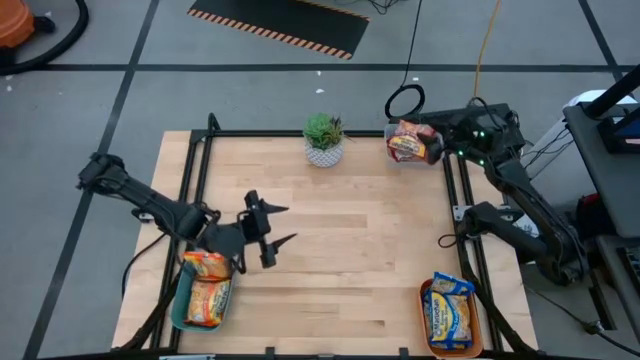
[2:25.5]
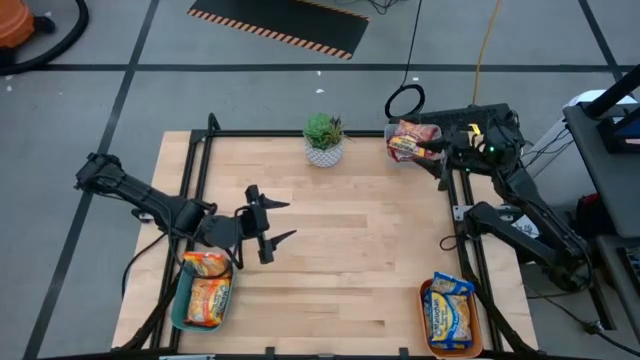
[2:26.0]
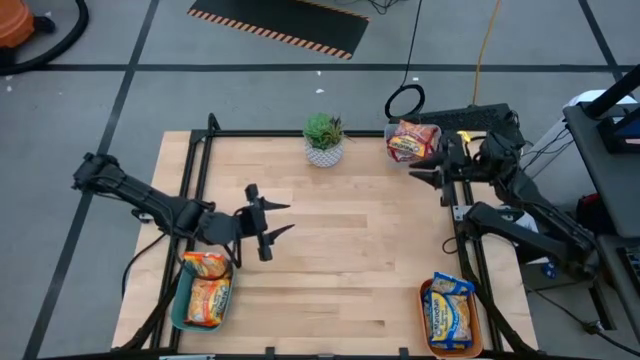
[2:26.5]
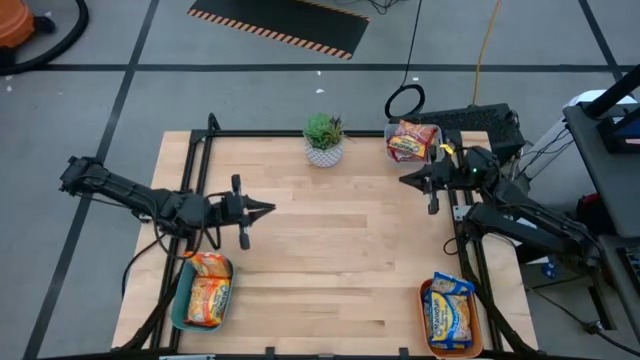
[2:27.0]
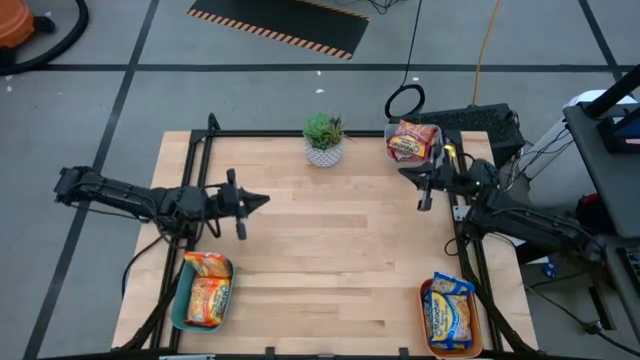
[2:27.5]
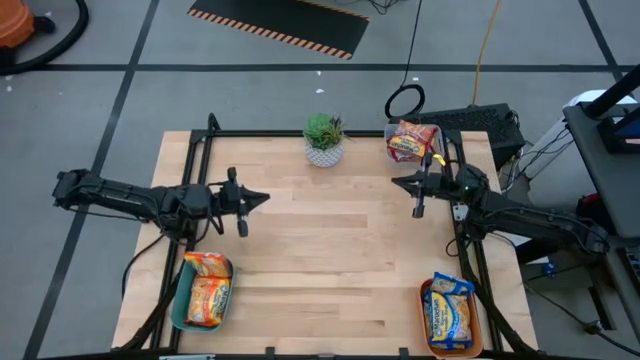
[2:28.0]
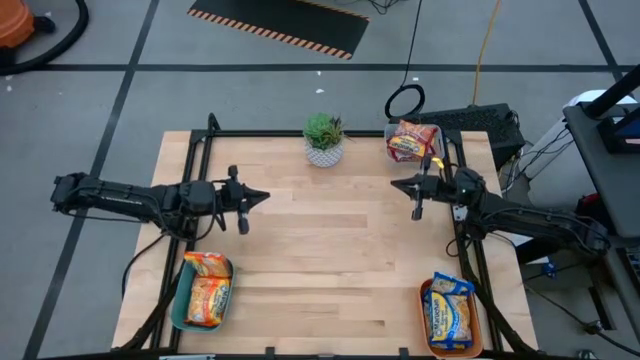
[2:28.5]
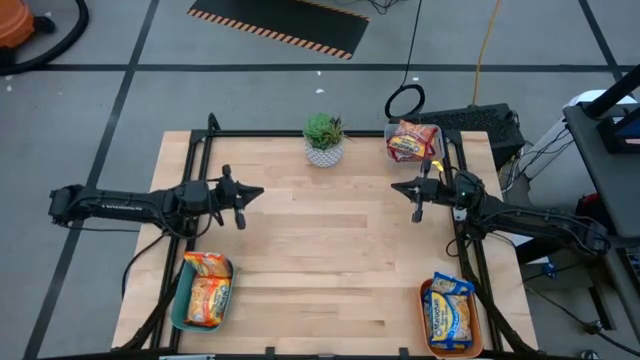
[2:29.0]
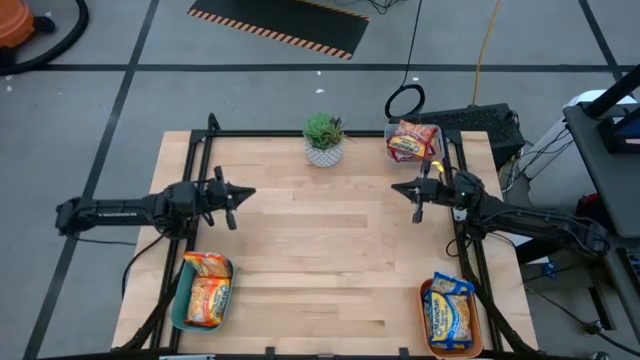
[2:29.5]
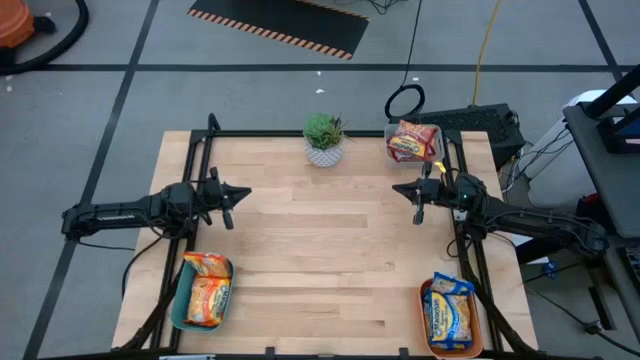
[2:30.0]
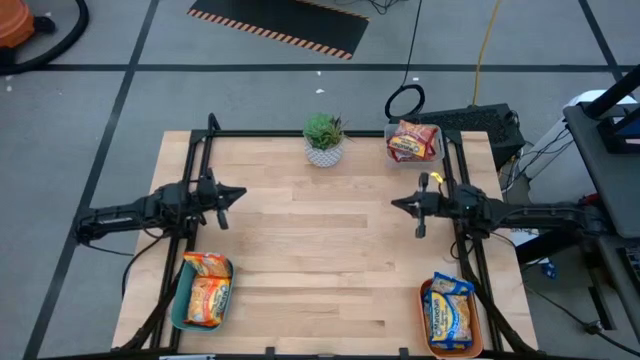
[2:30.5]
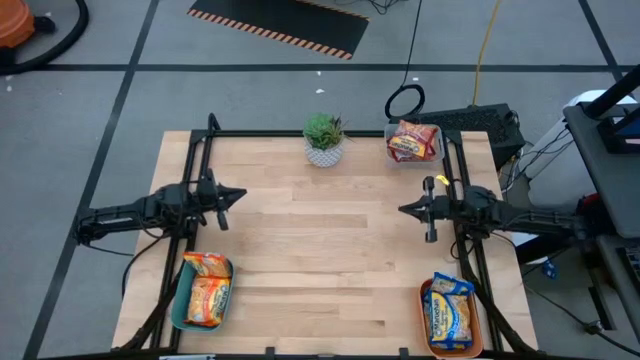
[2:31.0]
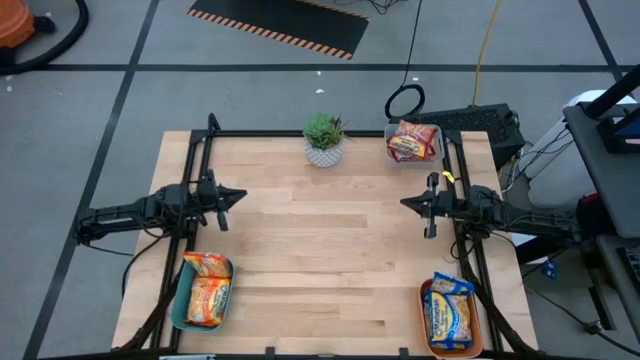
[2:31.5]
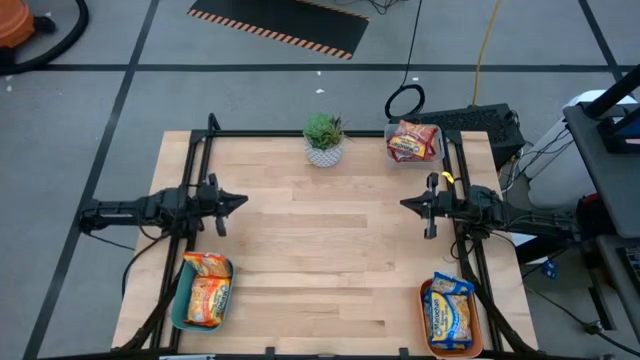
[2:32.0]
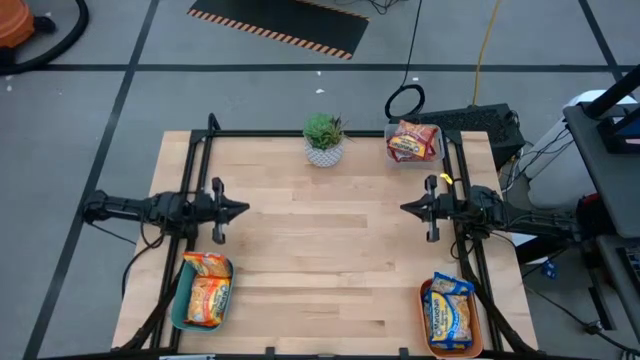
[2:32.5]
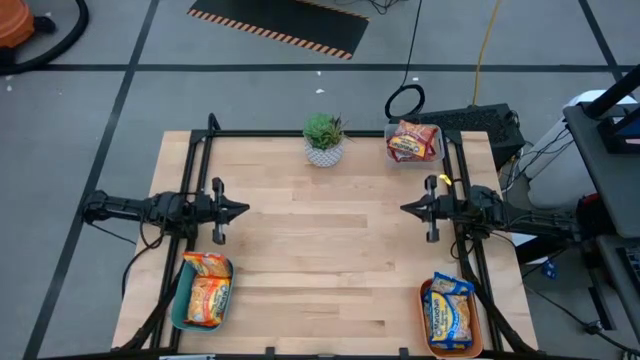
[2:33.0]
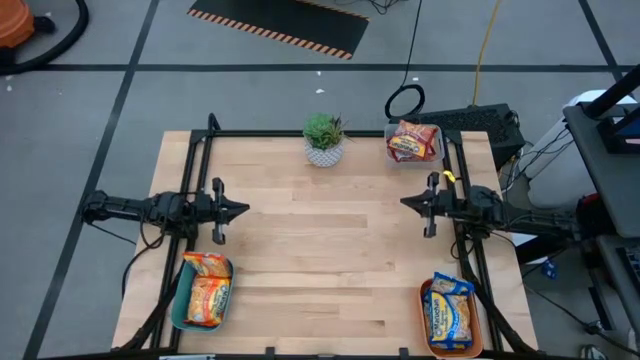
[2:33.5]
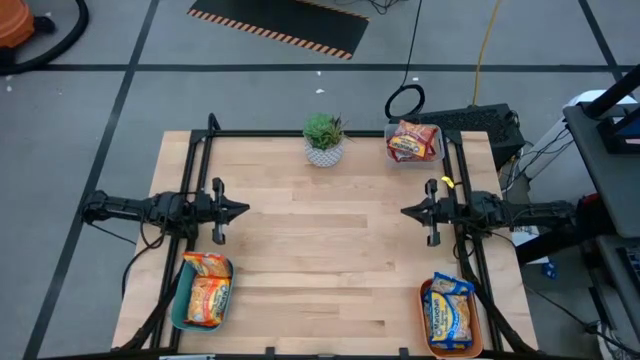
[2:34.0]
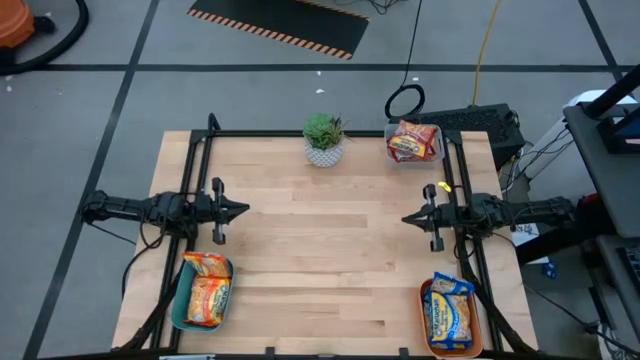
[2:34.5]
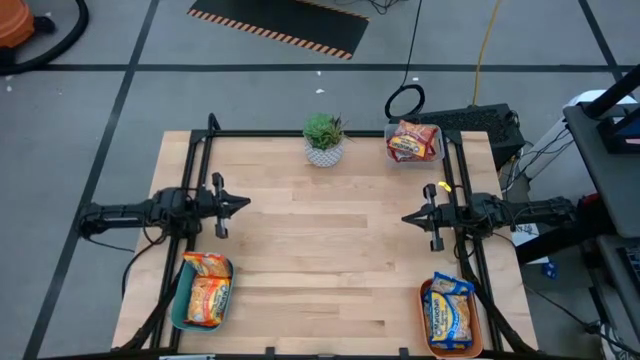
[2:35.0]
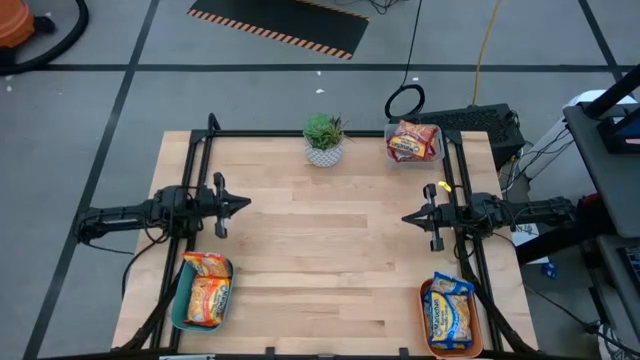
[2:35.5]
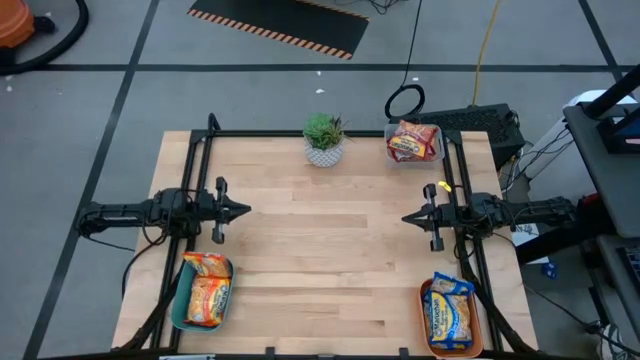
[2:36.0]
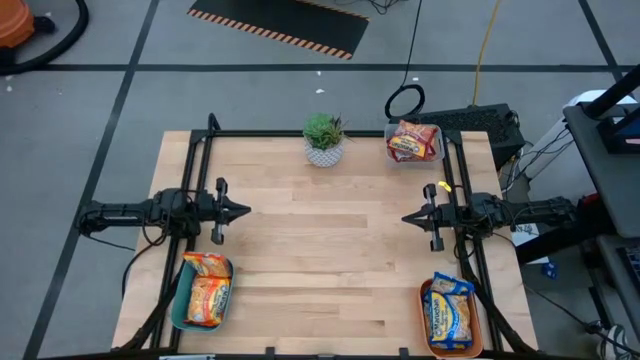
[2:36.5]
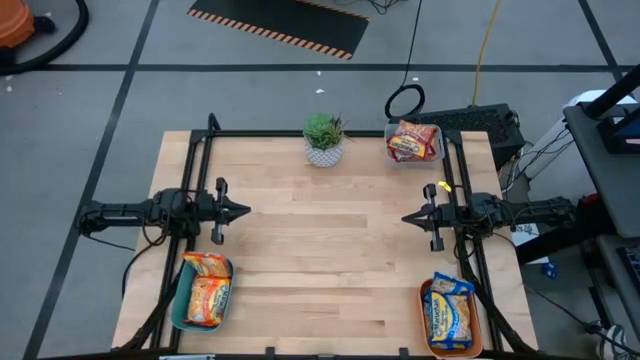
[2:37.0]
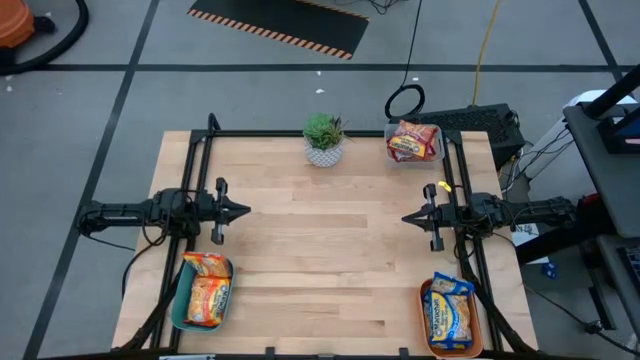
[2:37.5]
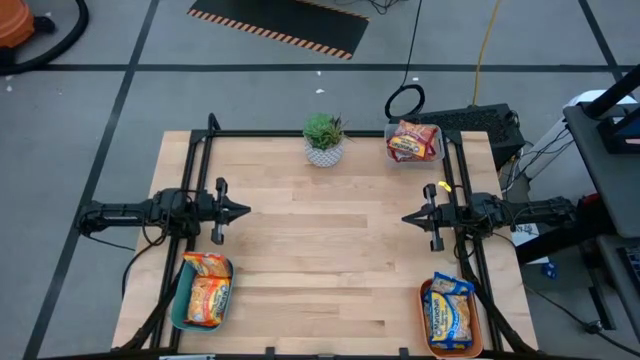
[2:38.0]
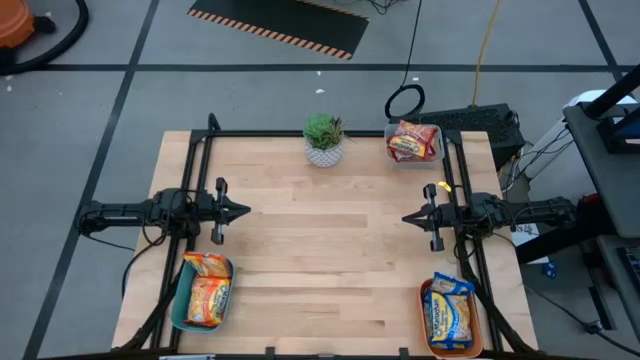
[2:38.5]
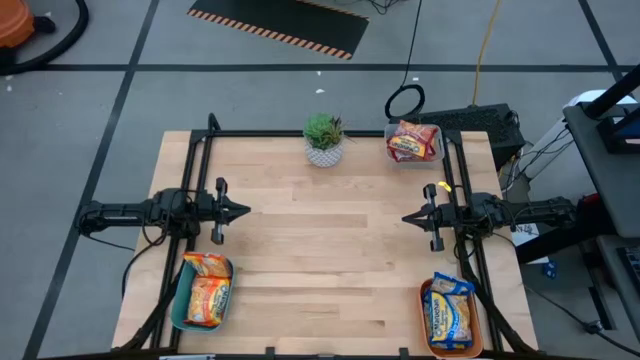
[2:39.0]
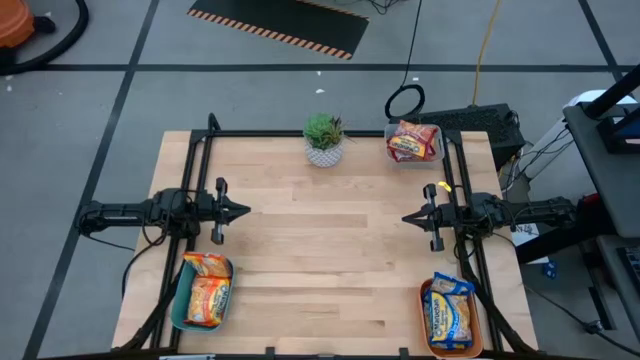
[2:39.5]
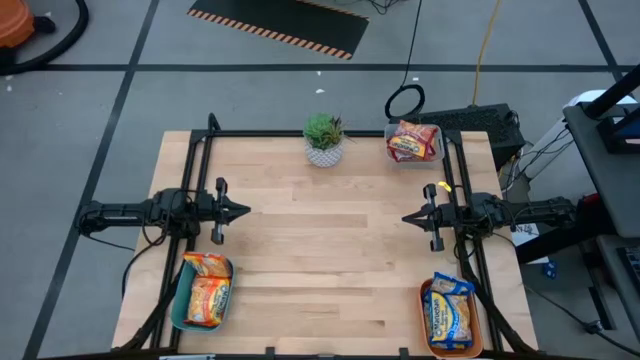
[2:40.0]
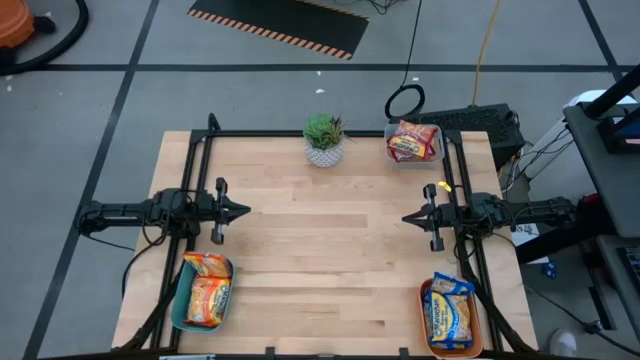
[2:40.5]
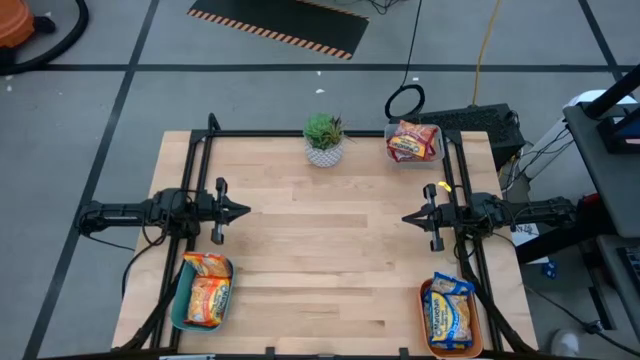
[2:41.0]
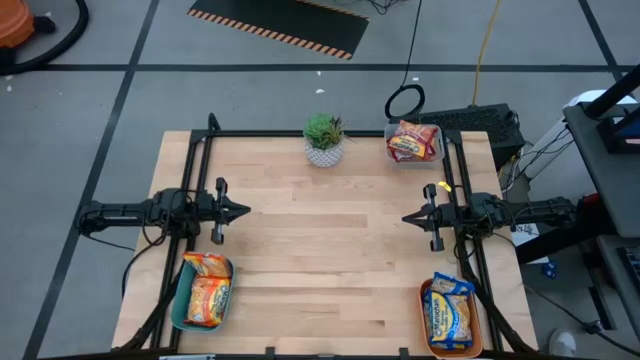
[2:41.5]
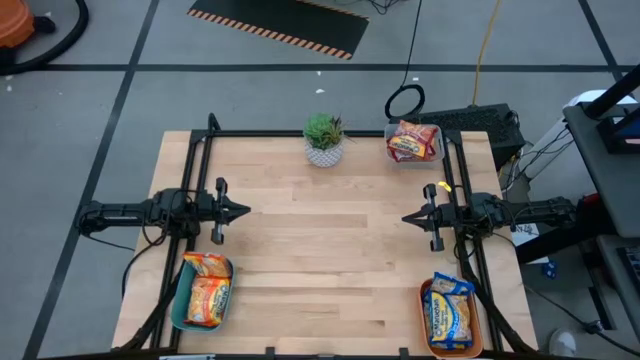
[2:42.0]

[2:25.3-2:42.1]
Task: Sort Maruchan noodles
Return to Home Position

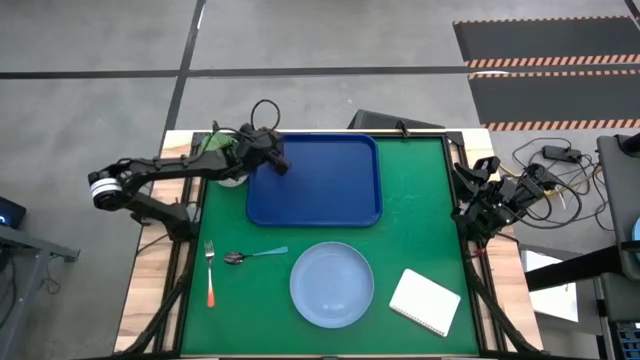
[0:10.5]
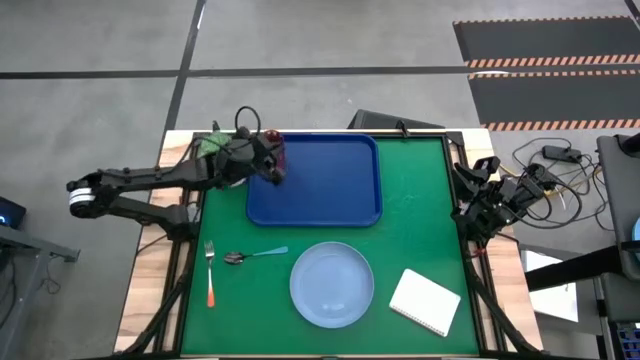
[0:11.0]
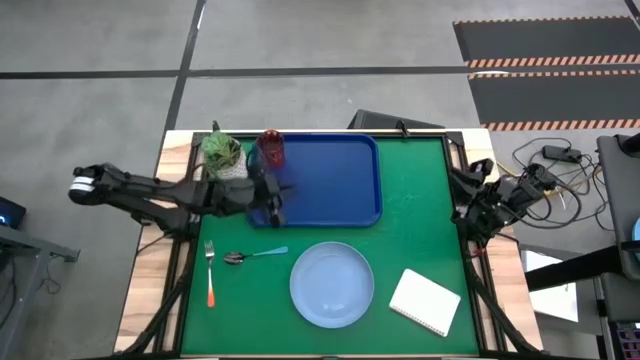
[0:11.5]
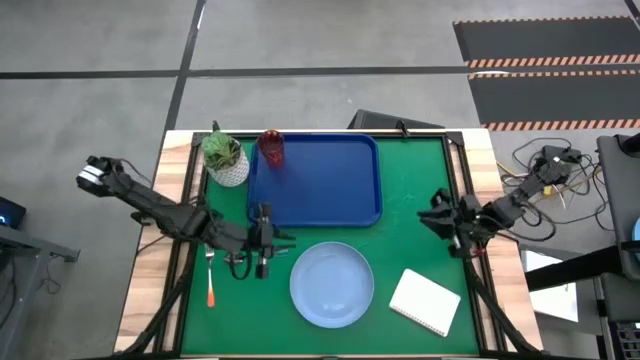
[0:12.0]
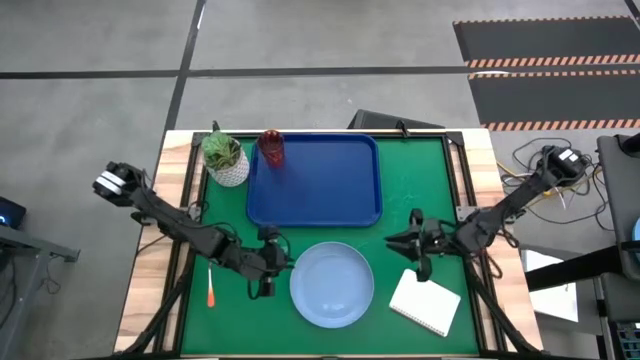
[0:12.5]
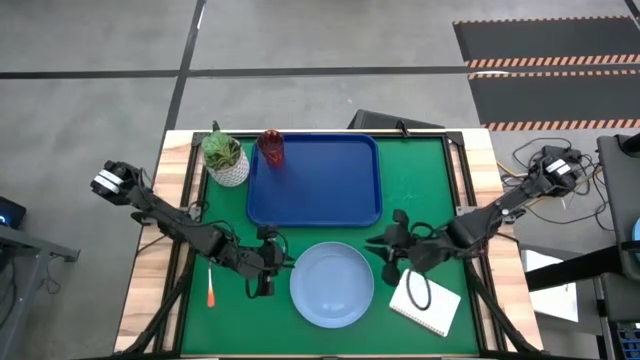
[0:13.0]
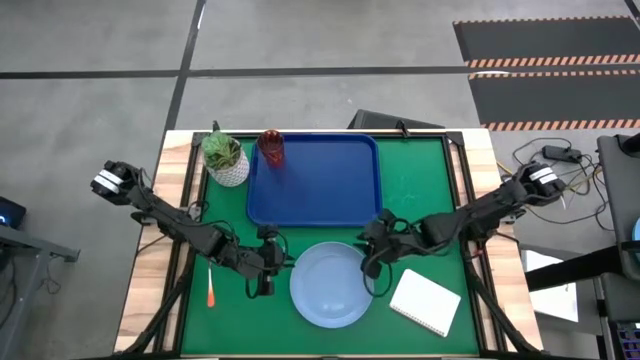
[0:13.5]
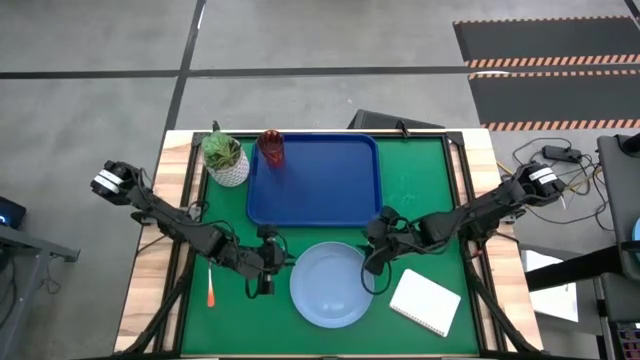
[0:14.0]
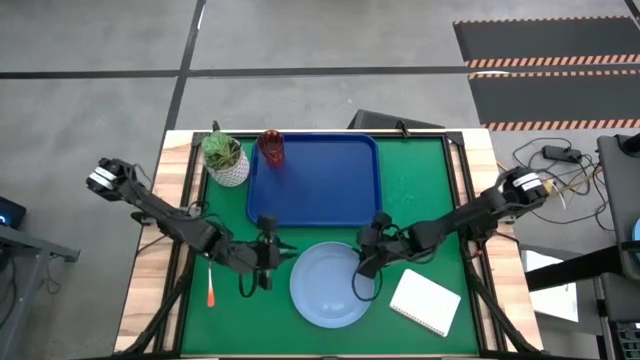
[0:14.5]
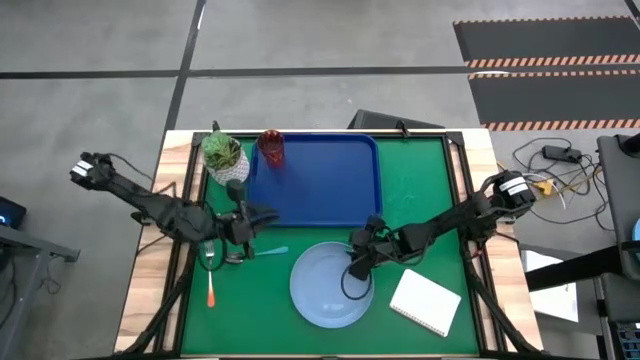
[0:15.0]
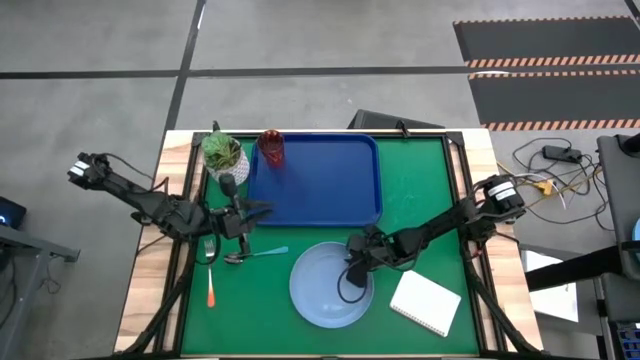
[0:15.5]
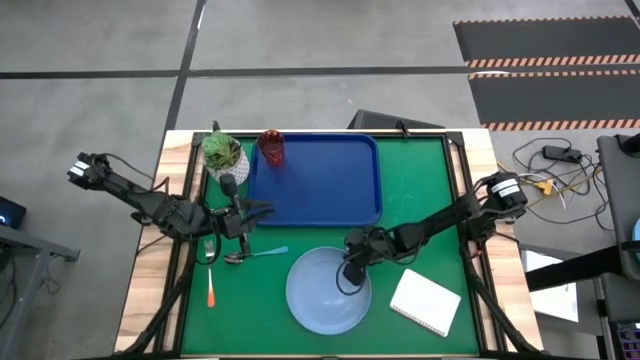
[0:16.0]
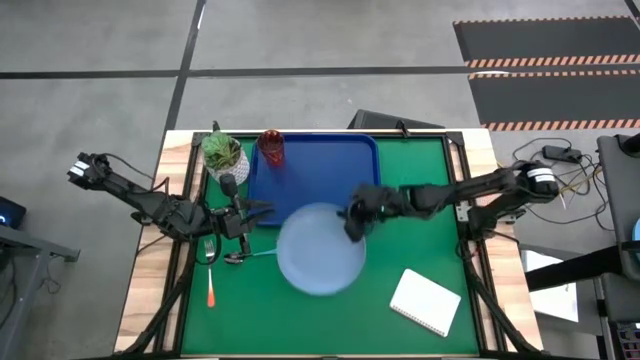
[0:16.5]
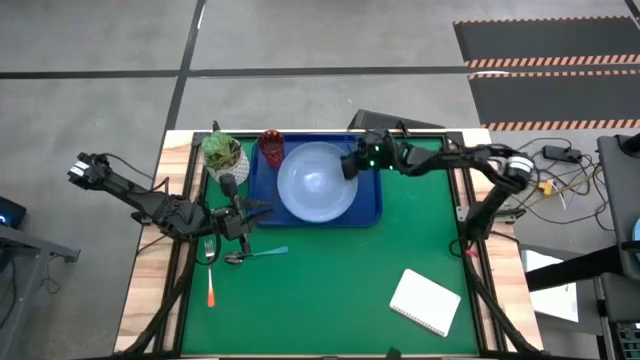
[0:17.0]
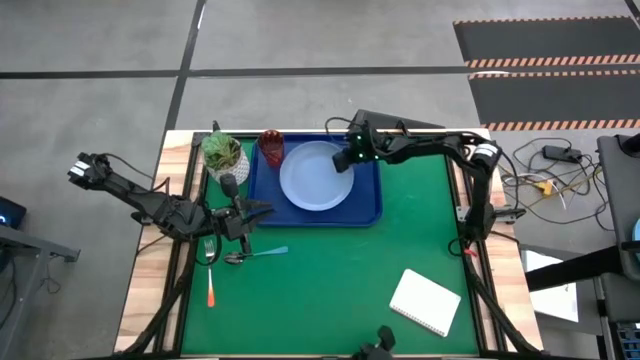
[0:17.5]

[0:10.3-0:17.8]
Task: Pick and place plate/cup/fork/spoon on tray
Put the plate on the blue tray
